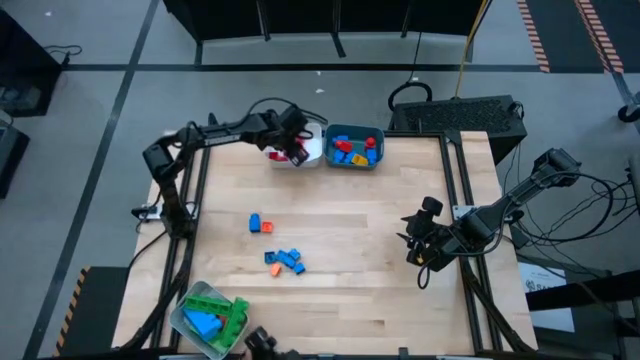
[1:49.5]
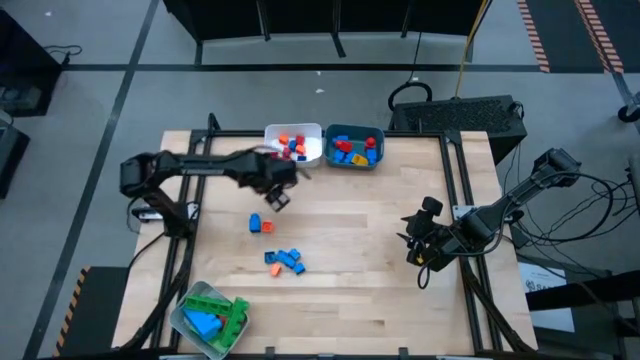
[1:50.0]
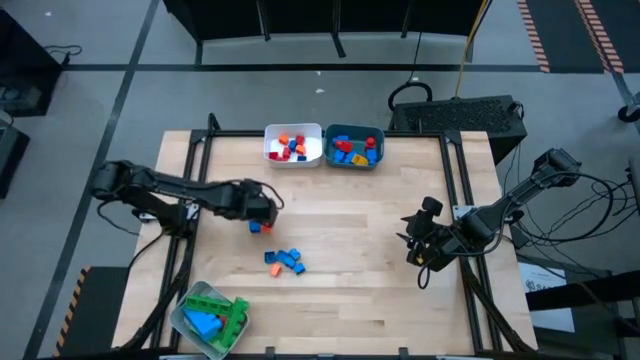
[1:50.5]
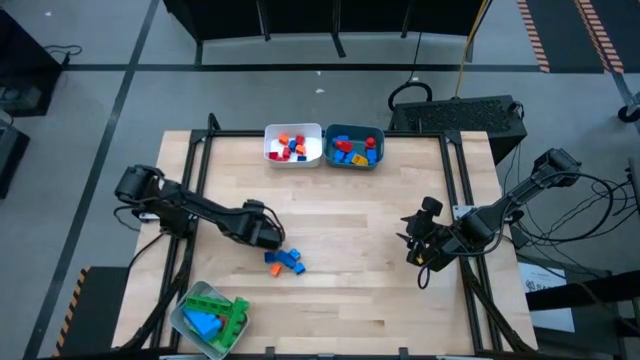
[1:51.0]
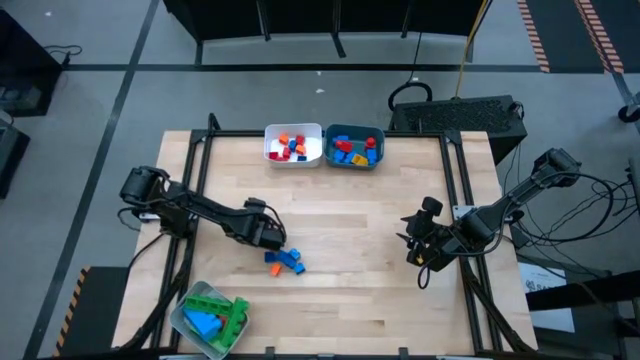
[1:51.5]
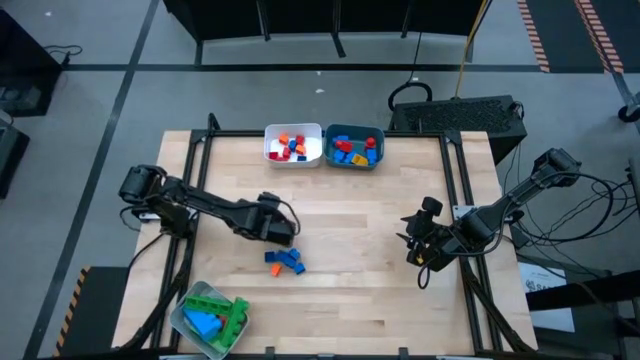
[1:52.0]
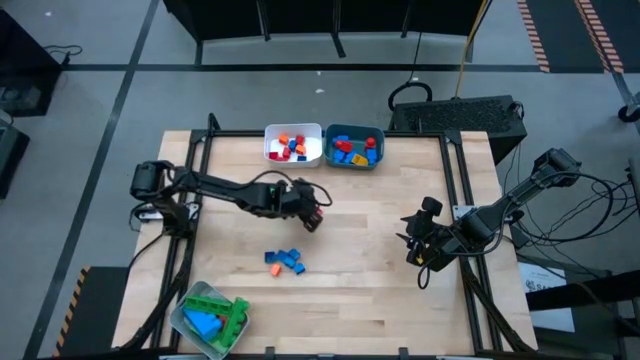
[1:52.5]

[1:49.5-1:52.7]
Task: Sort blocks by size
Put the blue 1 stud game piece into the blue bin

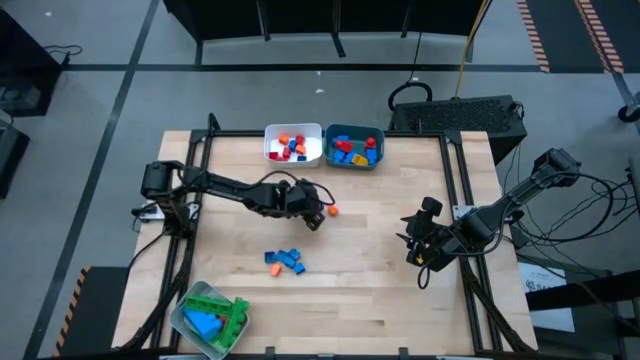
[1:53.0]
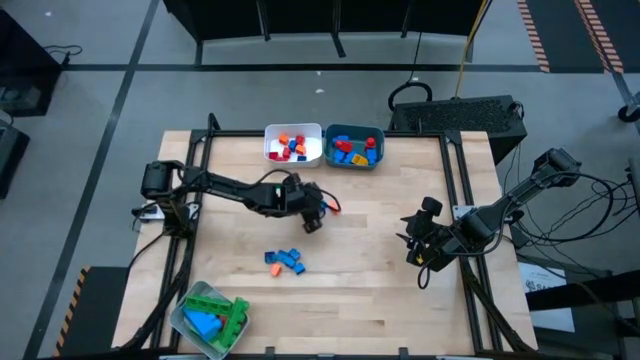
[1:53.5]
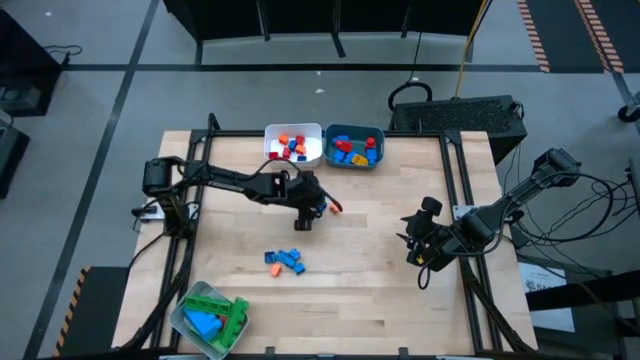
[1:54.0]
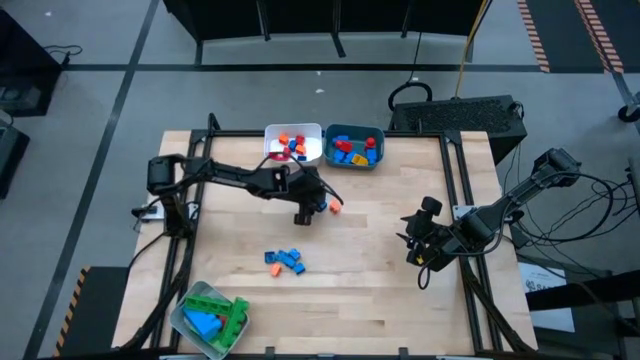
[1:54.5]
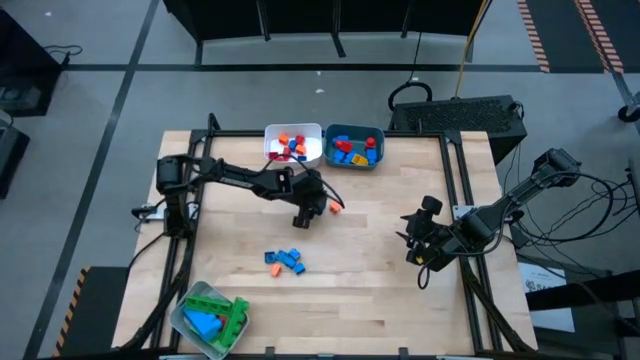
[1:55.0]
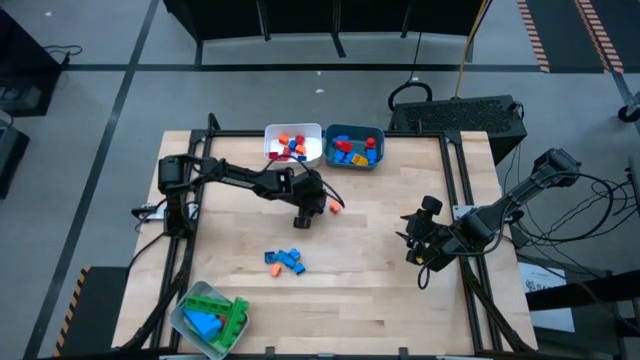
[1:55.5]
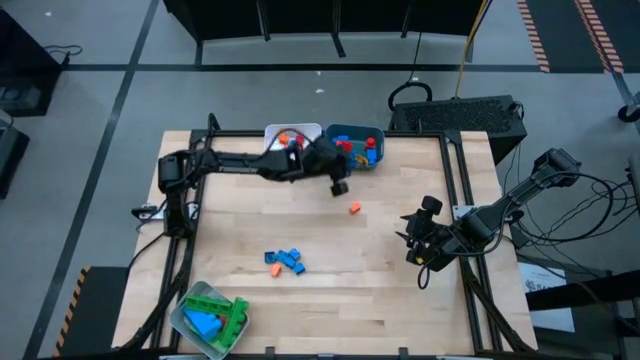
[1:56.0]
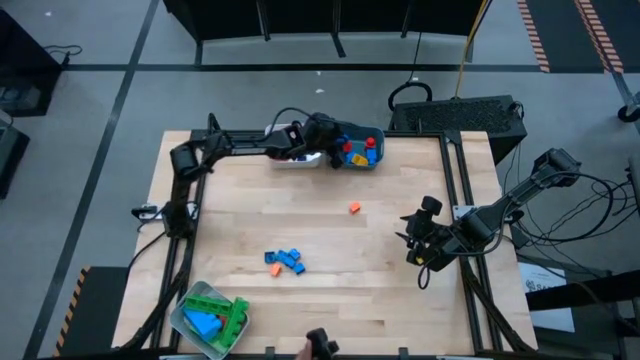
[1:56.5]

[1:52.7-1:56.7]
Put the blue 1 stud game piece into the blue bin

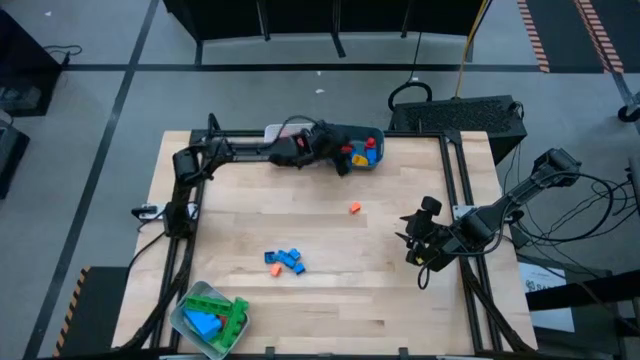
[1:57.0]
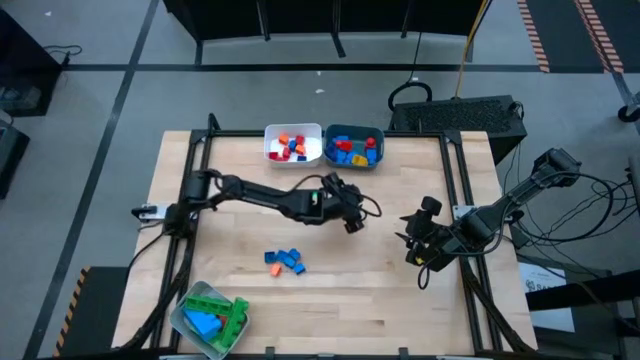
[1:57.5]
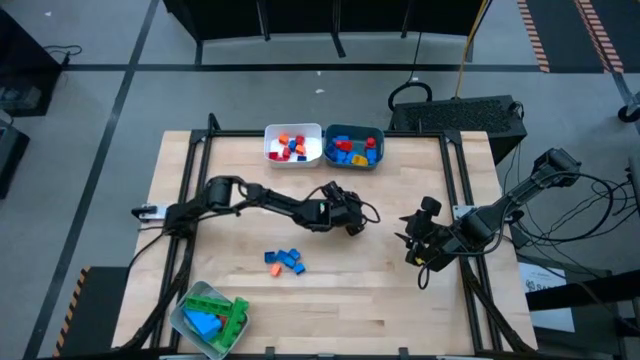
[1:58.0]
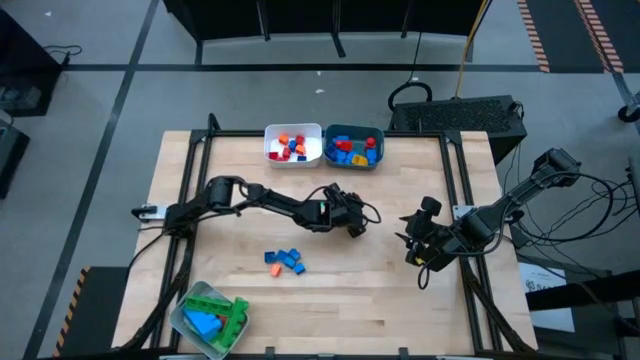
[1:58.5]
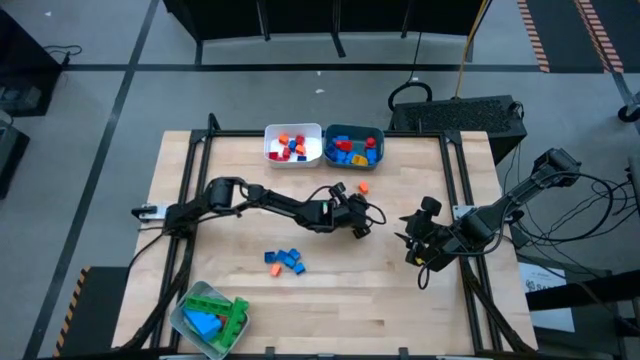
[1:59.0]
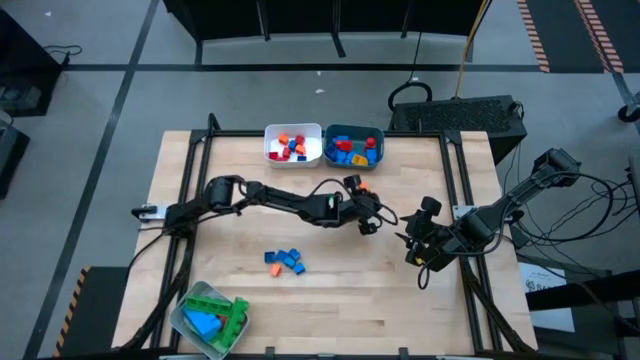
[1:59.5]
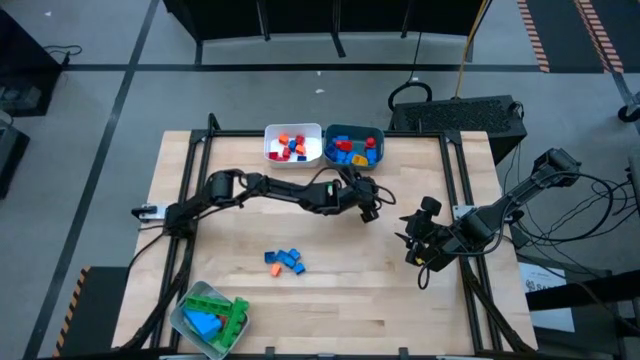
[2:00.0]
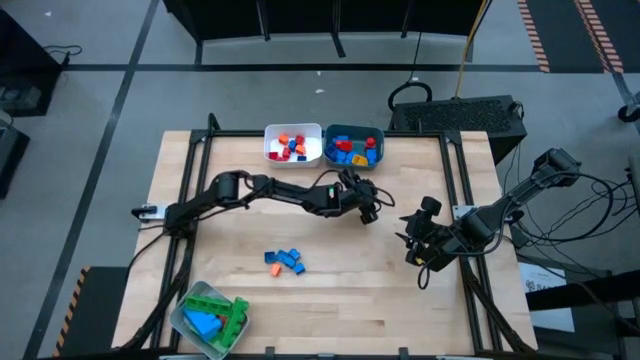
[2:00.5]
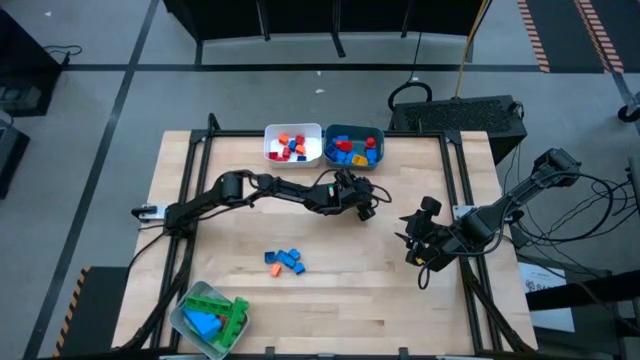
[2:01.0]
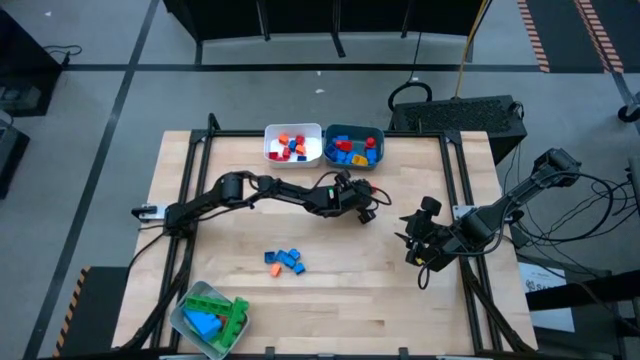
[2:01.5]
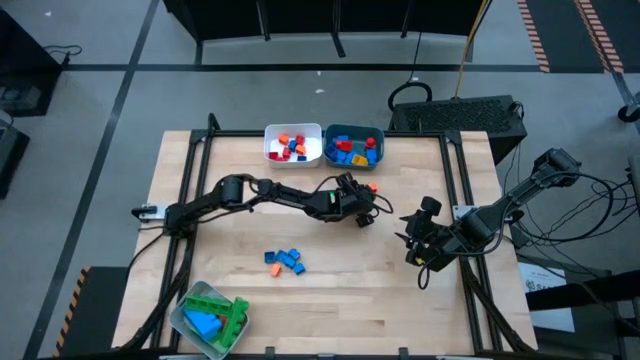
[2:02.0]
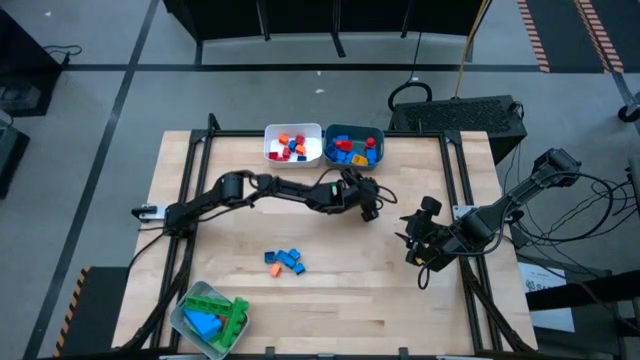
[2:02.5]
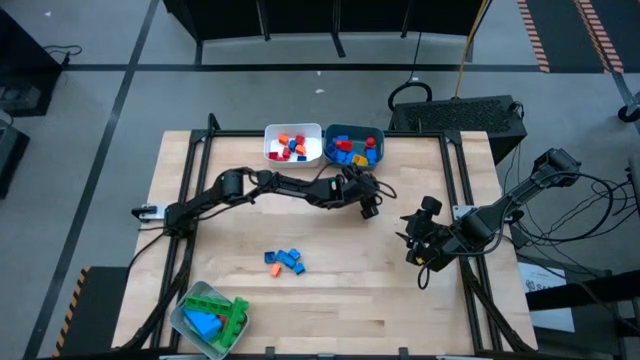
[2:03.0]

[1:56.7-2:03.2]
Put the orange cube 4 stud game piece into the white bin

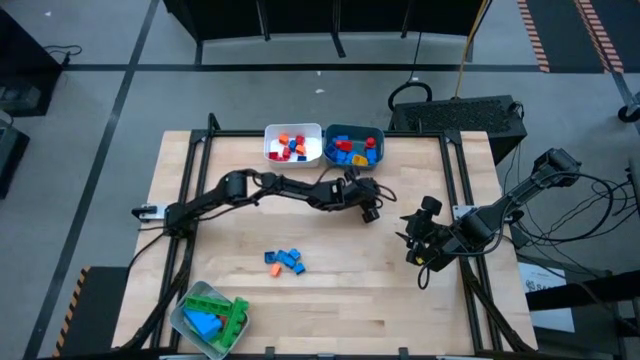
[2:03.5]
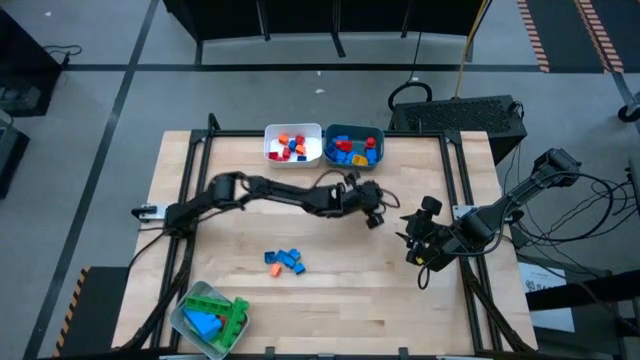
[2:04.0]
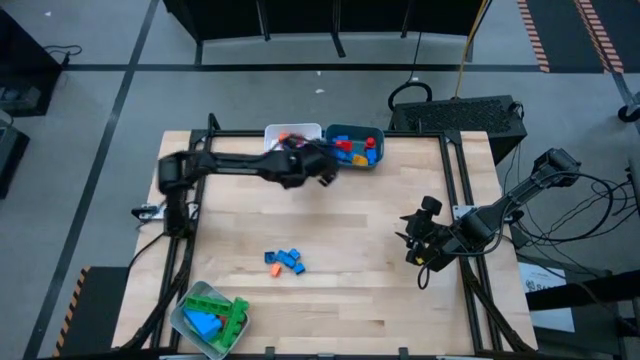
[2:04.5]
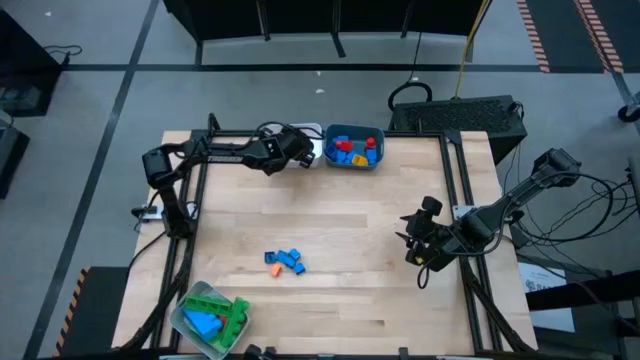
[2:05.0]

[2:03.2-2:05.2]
Put the orange cube 4 stud game piece into the white bin

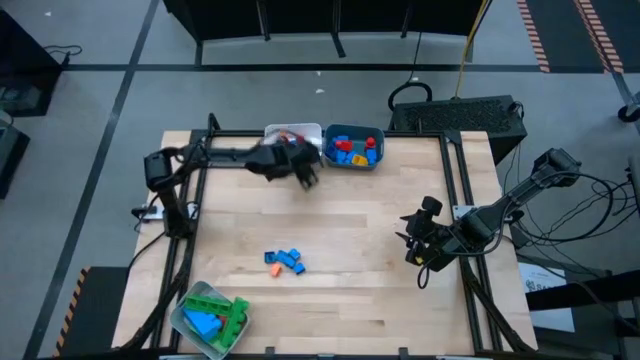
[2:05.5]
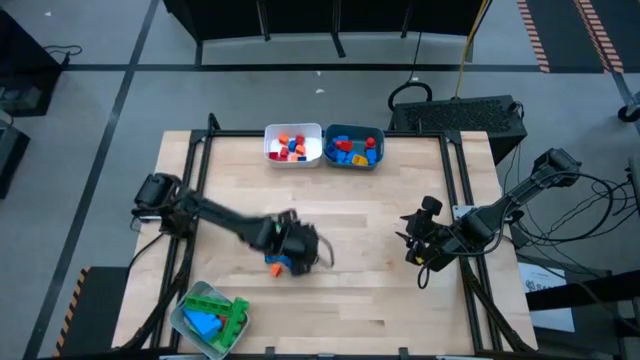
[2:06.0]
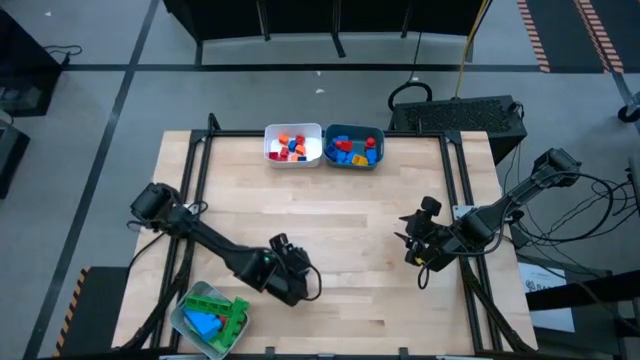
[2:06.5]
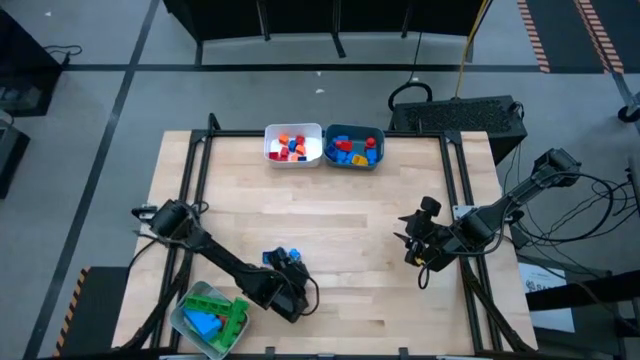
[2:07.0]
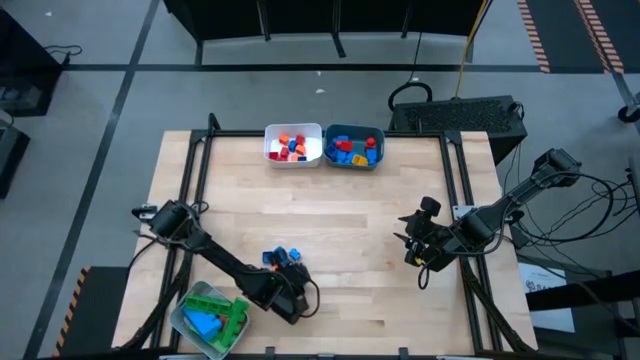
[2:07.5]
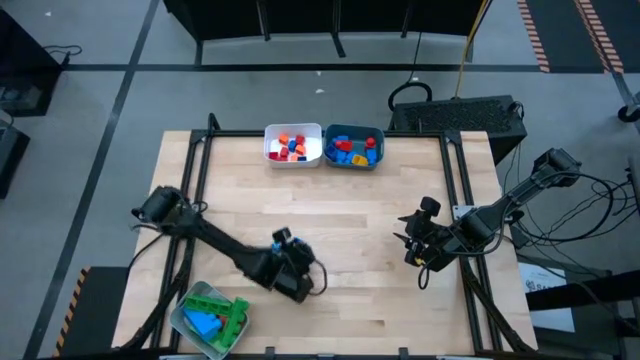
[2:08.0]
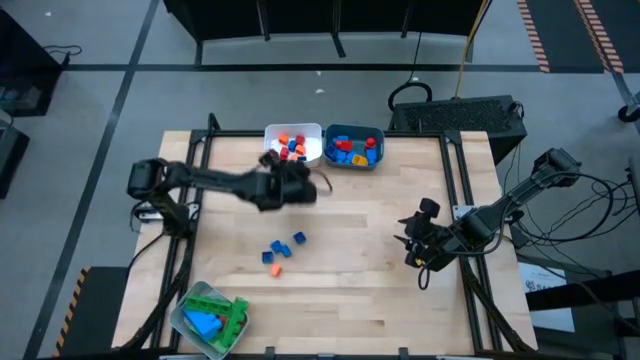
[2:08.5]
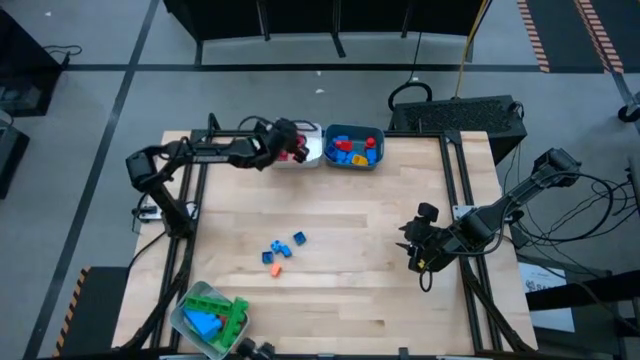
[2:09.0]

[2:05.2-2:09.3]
Put the blue cube 4 stud game piece into the white bin

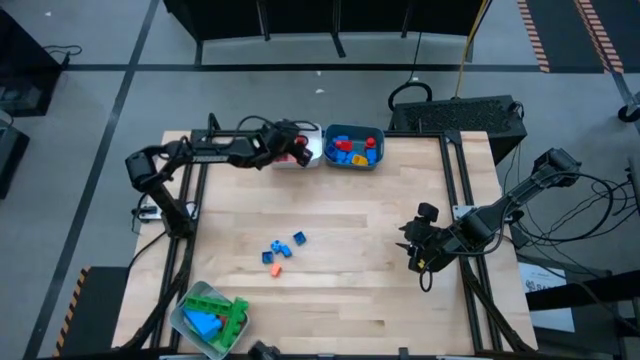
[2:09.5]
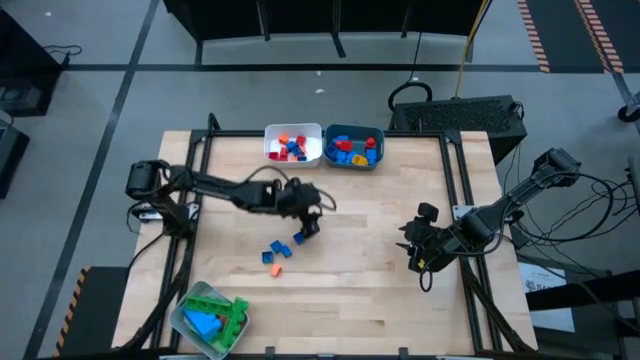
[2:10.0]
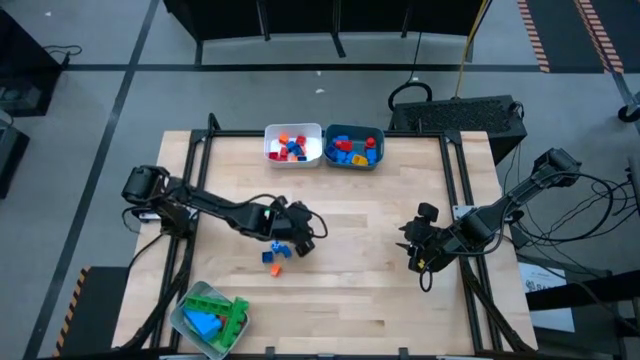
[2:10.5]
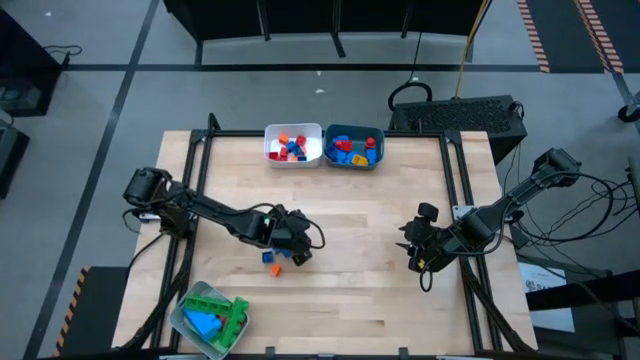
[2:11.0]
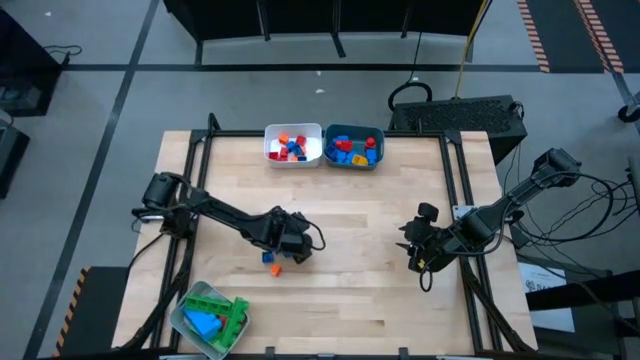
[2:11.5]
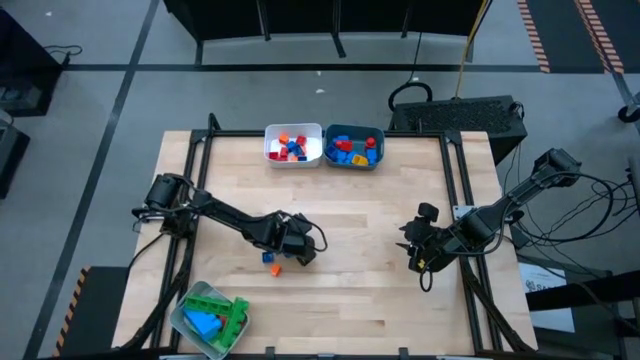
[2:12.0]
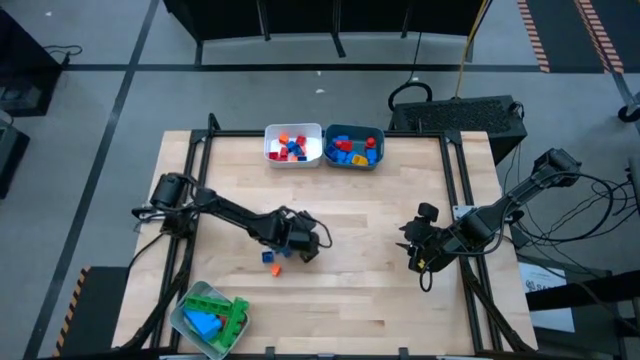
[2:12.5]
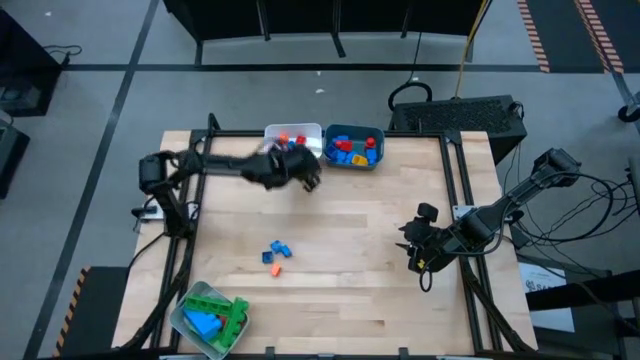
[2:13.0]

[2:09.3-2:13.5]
Put the blue cube 4 stud game piece into the white bin
